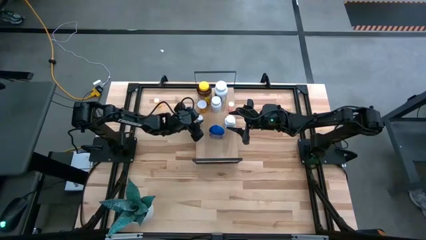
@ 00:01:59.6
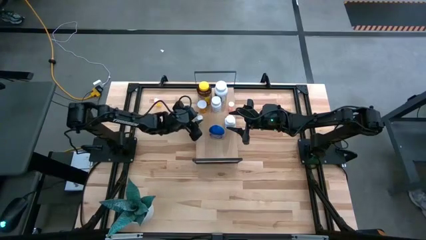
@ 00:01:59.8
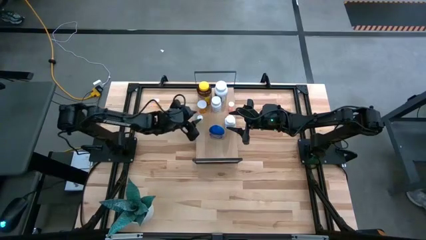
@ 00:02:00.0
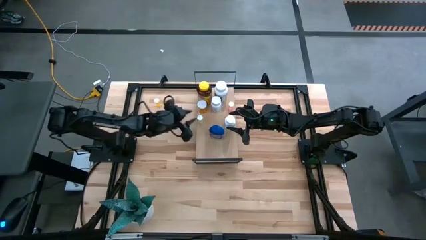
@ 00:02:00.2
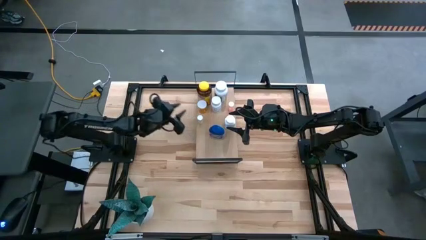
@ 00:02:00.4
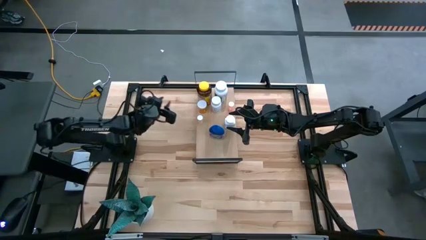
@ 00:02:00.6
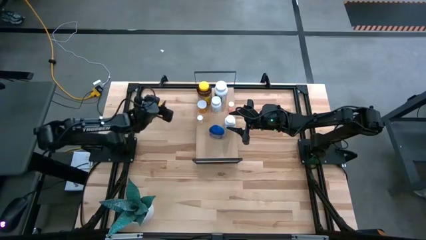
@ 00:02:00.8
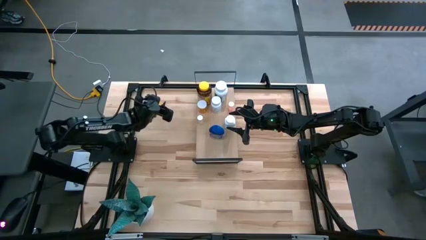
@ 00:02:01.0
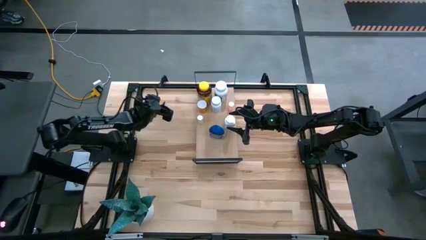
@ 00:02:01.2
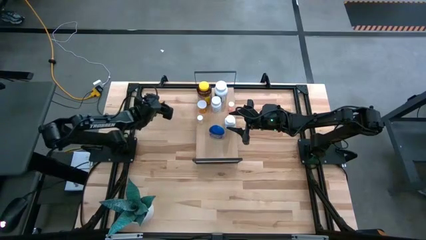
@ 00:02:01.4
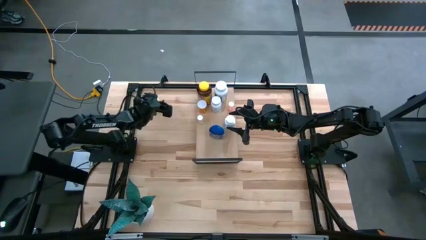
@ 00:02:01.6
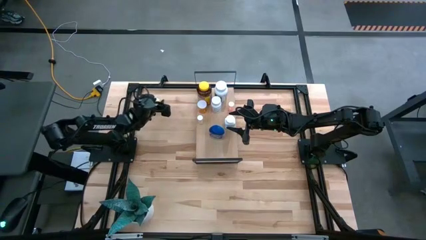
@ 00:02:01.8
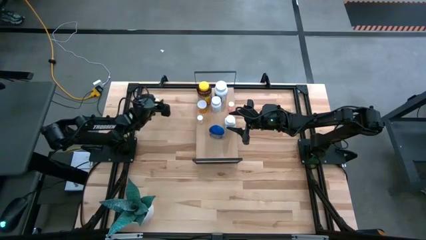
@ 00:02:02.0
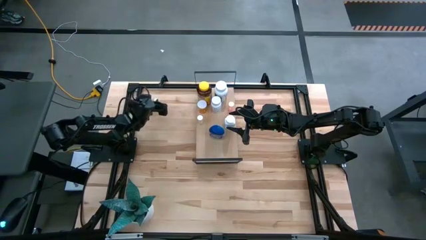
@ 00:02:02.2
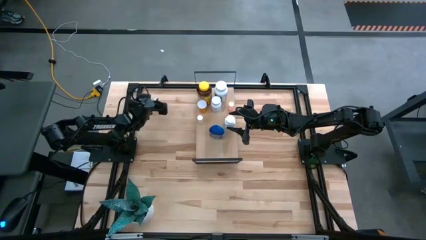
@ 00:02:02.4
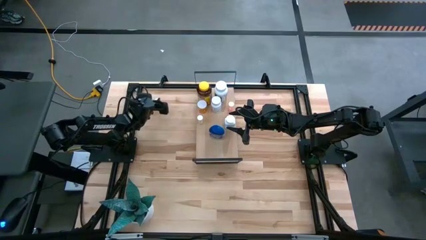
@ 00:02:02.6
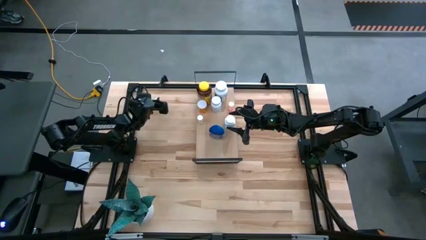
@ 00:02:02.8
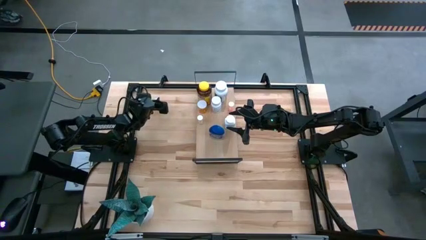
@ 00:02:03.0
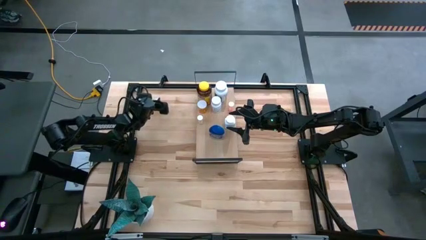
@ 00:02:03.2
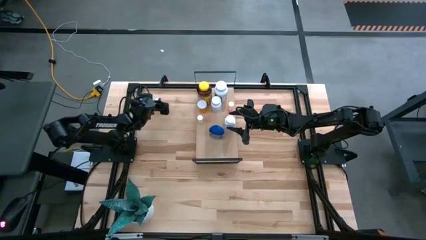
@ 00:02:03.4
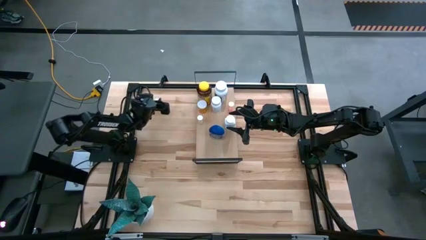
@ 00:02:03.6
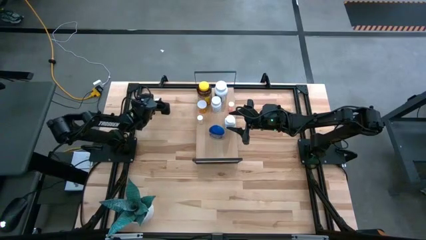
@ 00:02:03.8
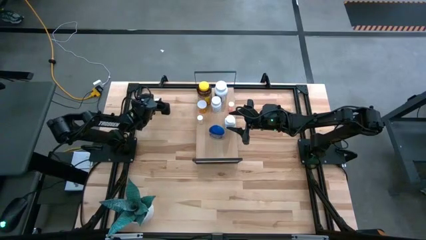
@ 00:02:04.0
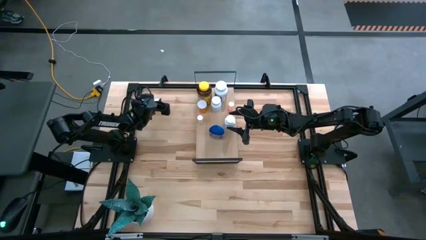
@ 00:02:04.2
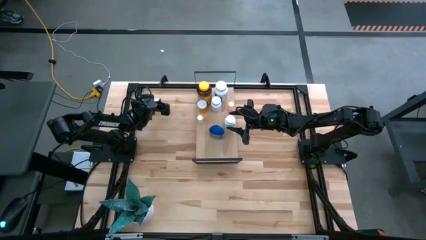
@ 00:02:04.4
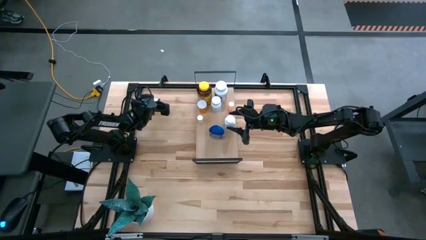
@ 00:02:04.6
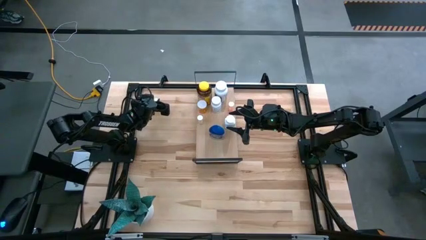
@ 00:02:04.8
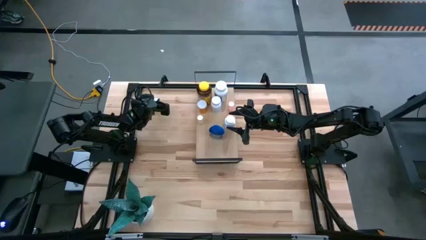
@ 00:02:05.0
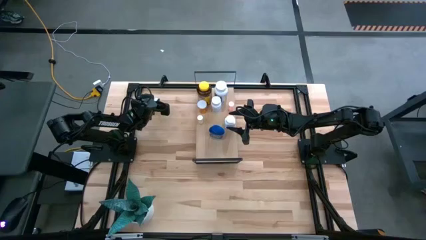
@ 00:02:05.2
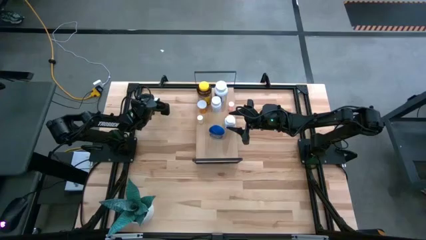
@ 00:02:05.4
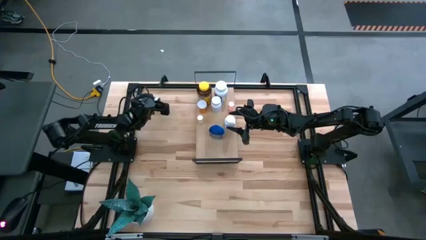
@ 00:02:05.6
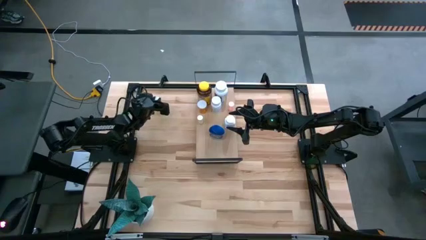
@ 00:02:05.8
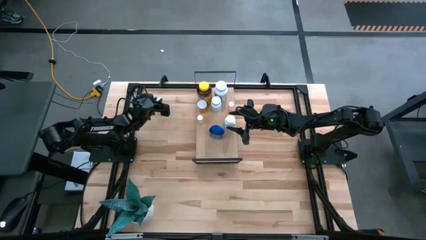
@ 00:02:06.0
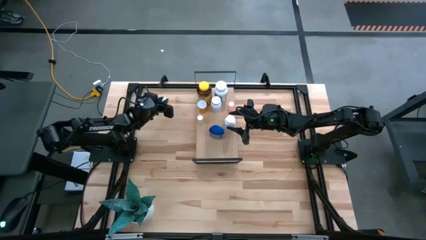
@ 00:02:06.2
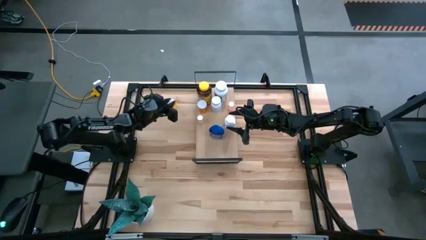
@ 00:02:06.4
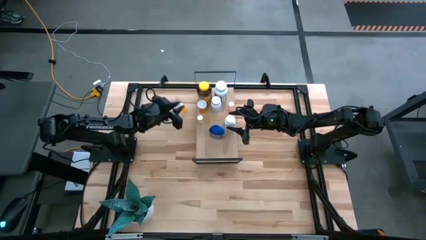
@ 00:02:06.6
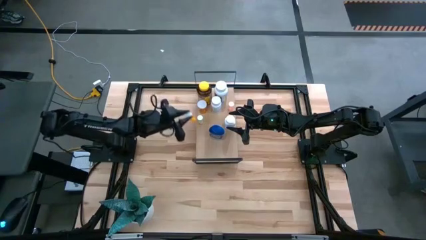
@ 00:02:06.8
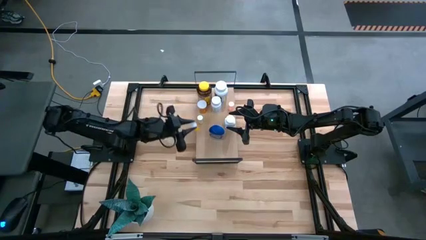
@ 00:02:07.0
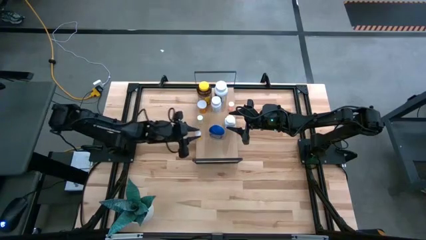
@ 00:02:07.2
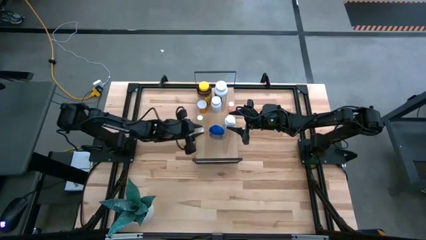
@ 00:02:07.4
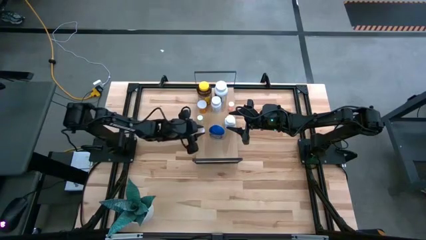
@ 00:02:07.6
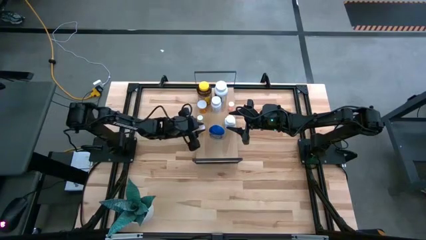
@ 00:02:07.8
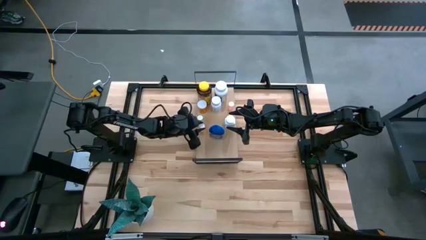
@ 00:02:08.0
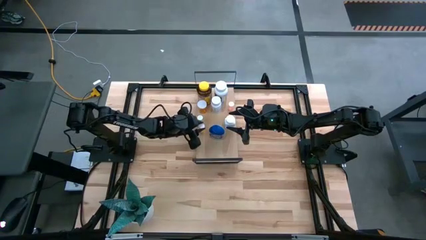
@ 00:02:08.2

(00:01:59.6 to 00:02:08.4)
Task: Pick and place medicine bottles onto shelf by color
Put the small orange medicine bottle on the shelf

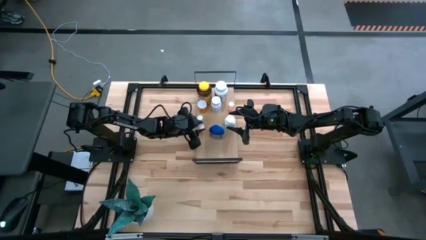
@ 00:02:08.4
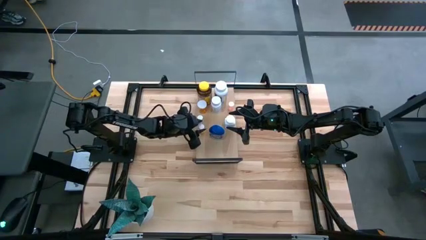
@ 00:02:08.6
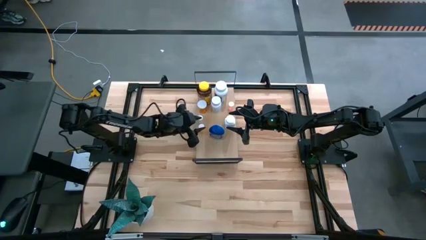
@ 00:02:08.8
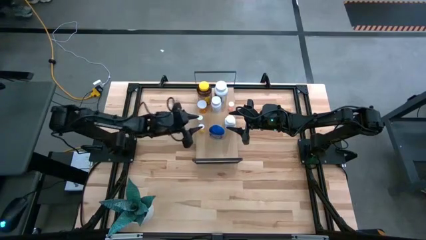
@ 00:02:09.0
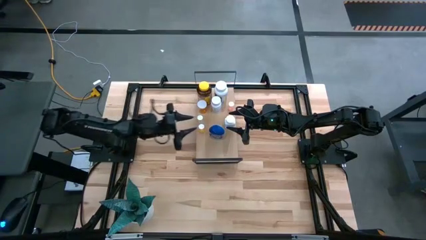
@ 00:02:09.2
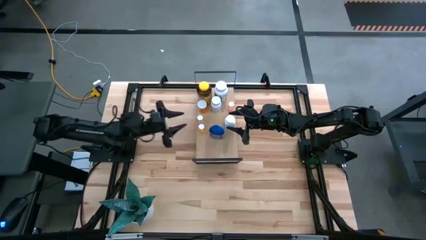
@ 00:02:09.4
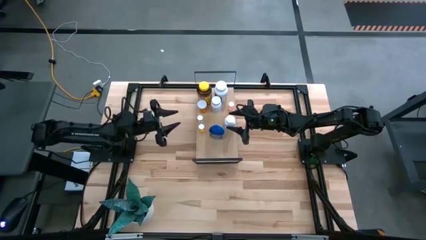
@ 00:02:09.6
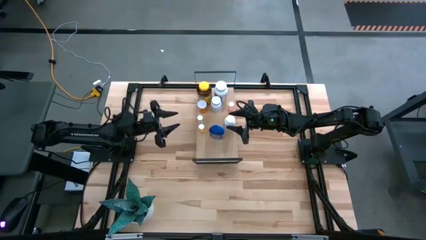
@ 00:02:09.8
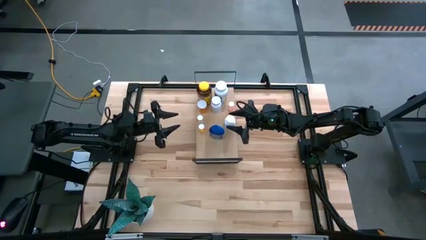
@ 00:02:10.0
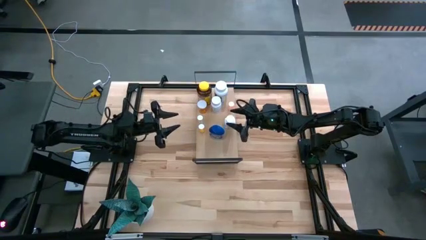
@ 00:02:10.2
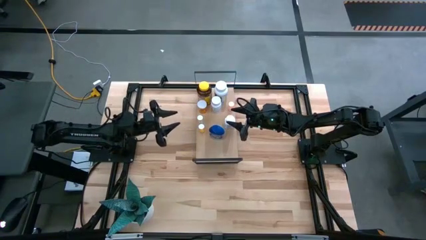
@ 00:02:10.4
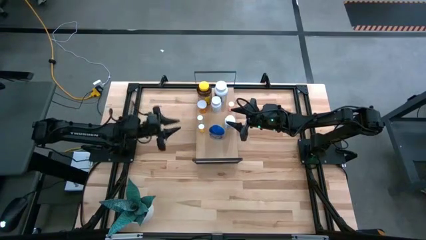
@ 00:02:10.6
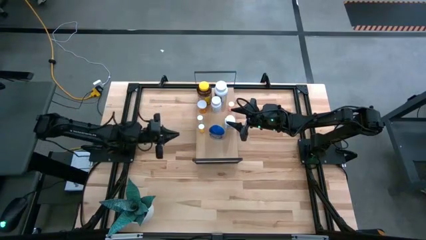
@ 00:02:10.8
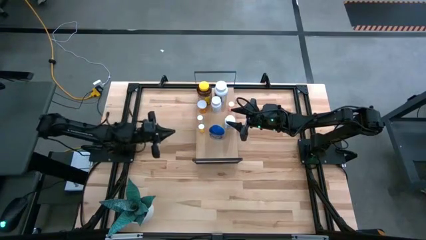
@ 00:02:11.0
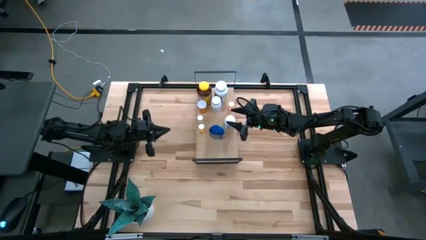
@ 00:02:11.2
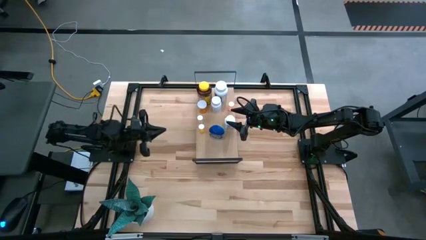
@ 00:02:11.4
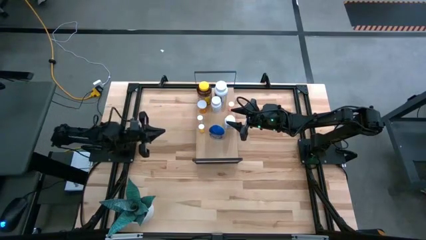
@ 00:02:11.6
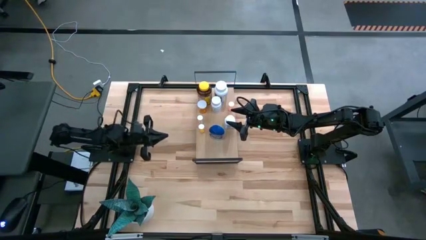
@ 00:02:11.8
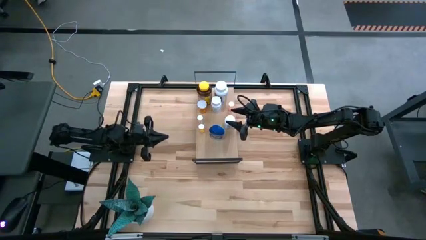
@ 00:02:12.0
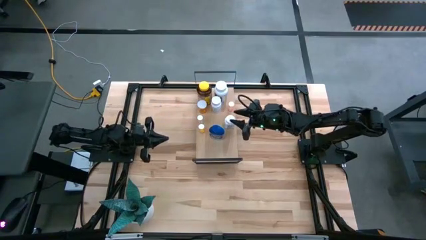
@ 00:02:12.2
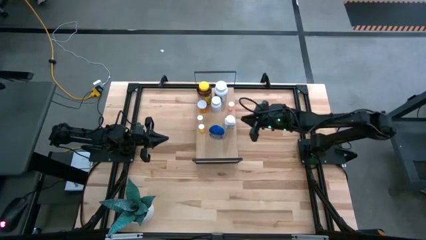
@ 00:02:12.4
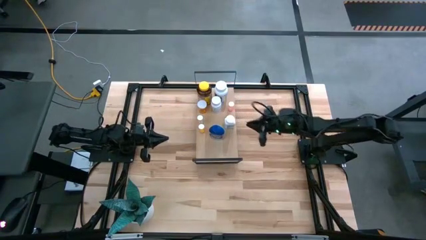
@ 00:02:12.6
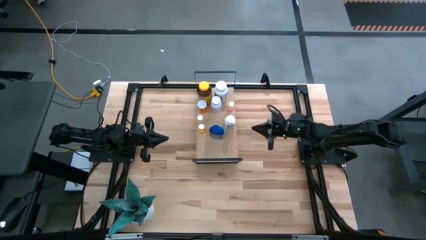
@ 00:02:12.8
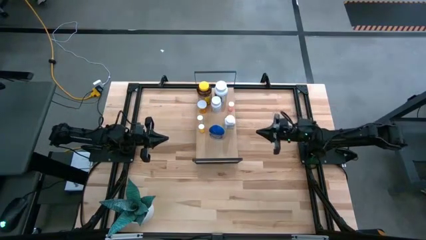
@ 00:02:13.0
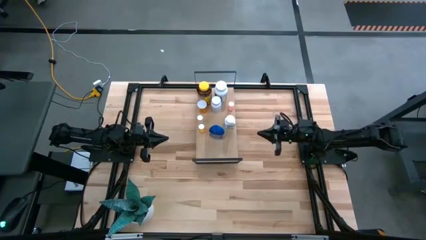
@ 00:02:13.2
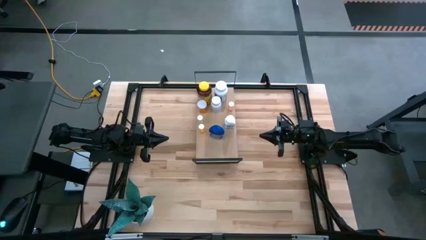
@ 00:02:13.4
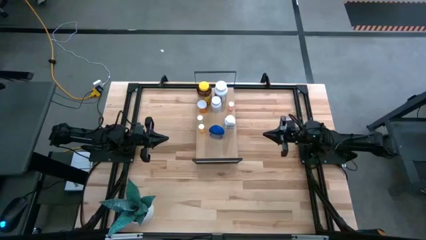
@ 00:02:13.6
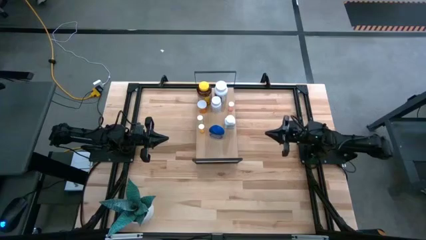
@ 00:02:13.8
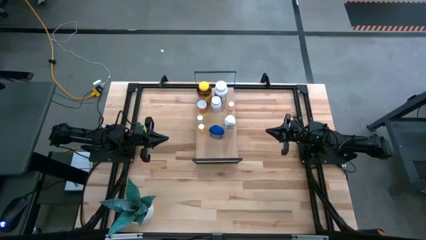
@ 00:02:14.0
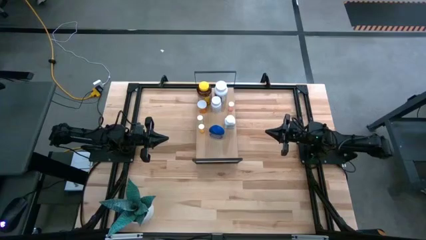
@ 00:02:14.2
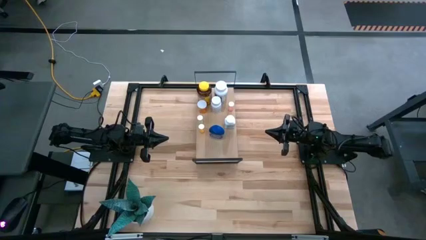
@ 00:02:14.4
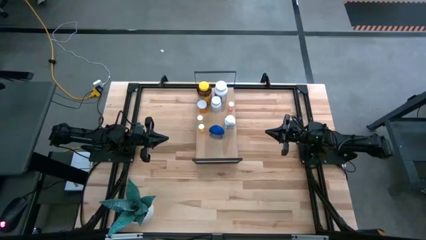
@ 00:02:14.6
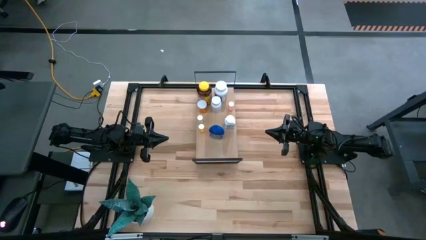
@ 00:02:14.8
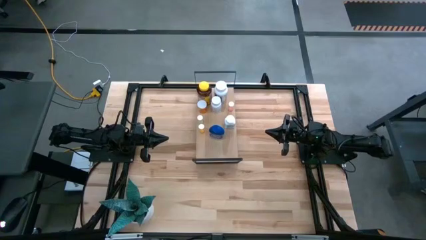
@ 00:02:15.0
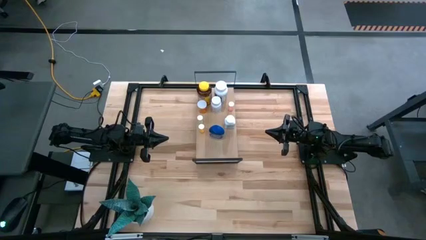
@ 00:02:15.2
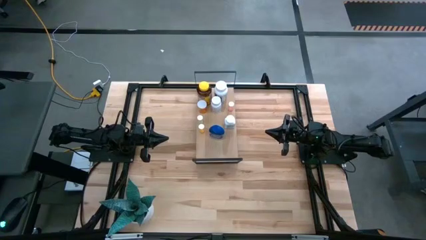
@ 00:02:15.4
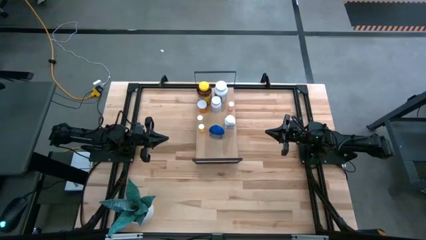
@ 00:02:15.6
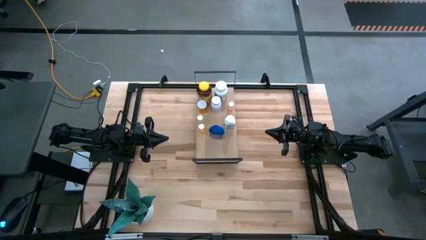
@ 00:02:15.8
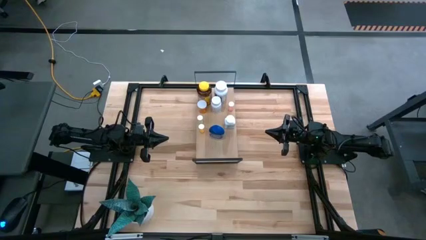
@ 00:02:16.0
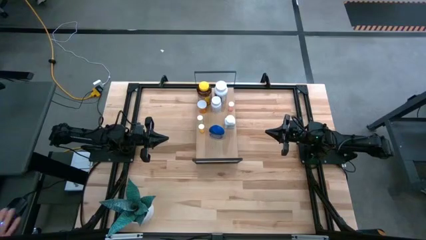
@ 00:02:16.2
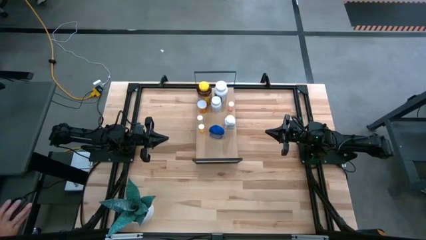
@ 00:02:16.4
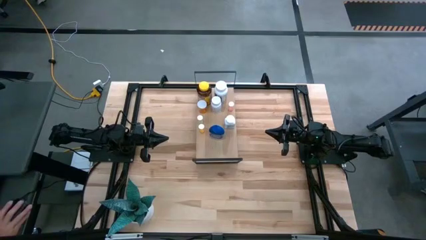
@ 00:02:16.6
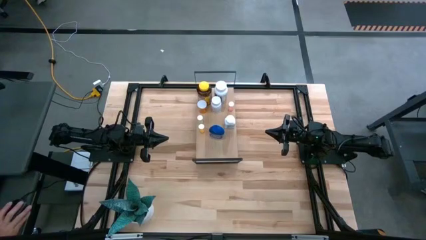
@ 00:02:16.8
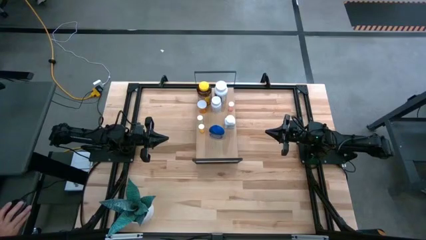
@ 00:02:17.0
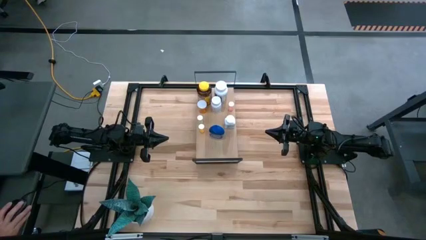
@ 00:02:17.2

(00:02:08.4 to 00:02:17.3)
Return to Home Position
